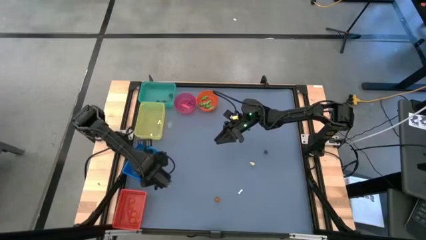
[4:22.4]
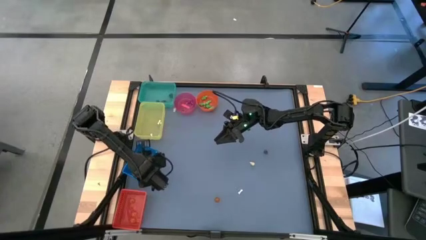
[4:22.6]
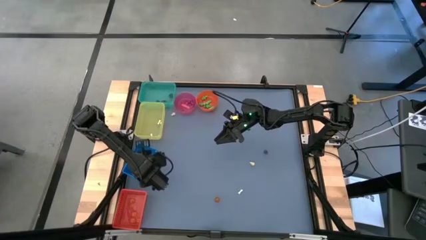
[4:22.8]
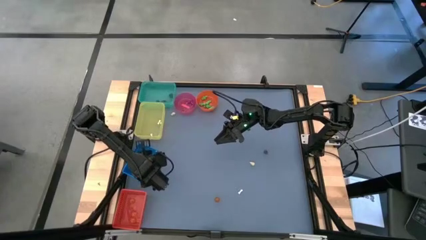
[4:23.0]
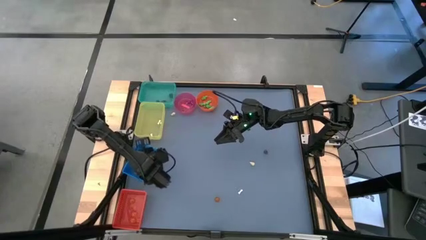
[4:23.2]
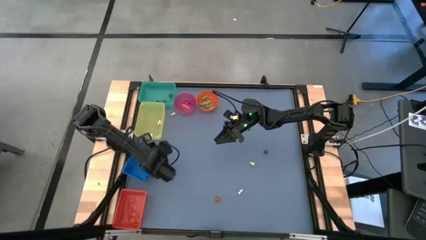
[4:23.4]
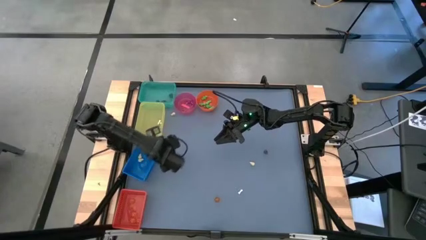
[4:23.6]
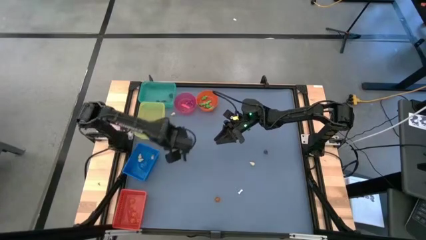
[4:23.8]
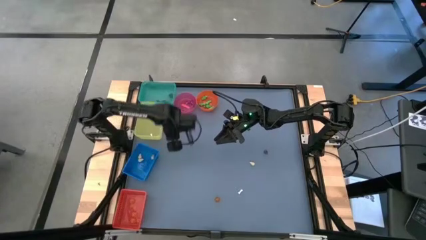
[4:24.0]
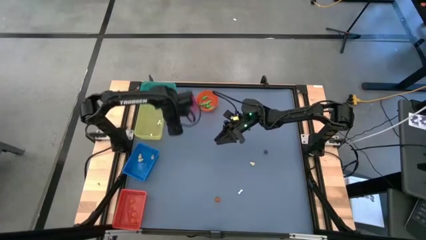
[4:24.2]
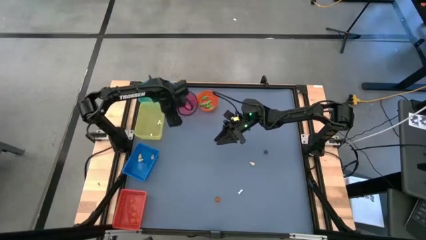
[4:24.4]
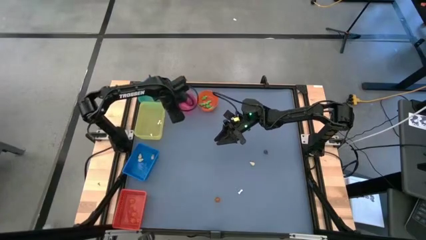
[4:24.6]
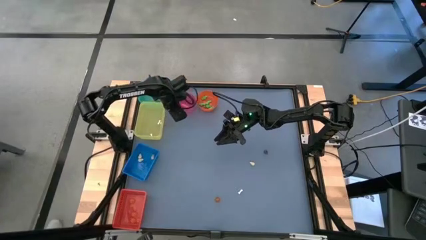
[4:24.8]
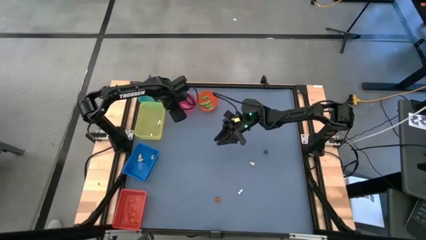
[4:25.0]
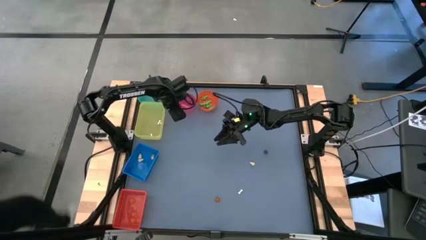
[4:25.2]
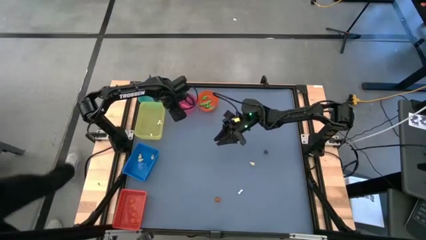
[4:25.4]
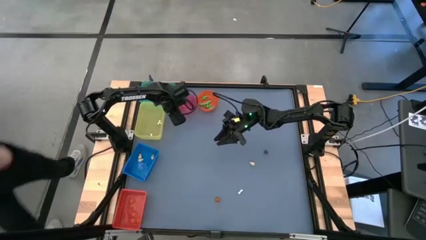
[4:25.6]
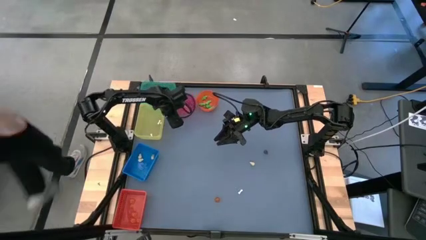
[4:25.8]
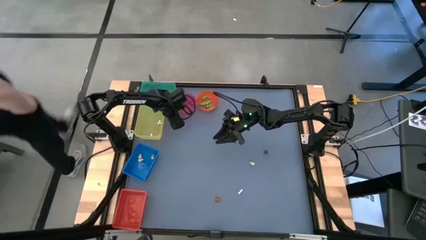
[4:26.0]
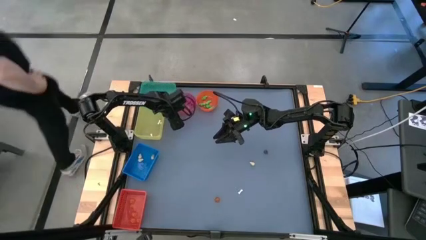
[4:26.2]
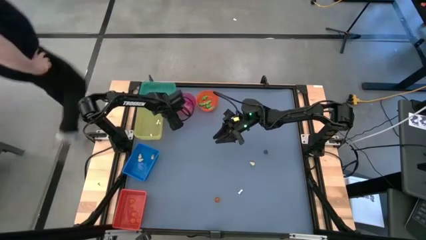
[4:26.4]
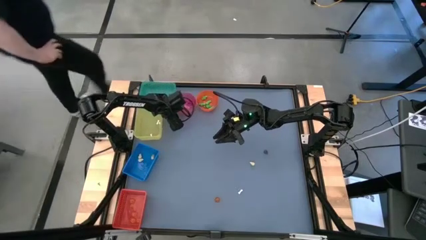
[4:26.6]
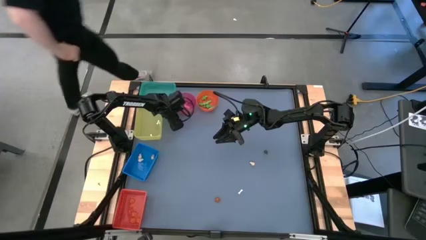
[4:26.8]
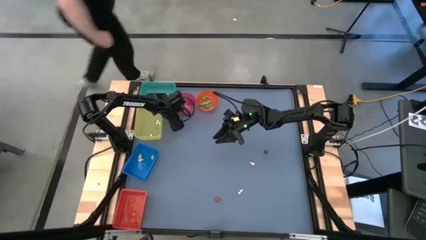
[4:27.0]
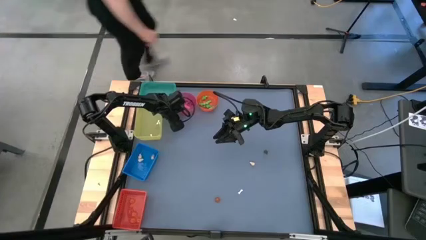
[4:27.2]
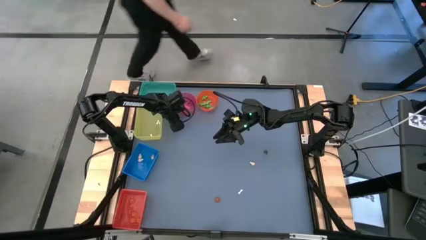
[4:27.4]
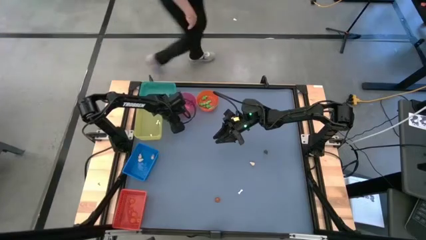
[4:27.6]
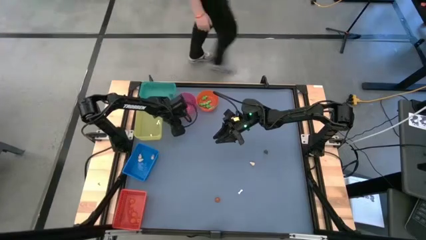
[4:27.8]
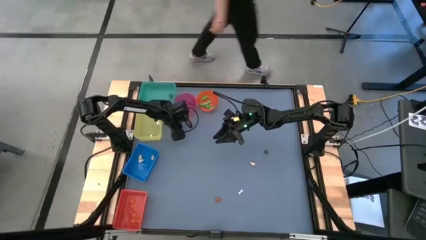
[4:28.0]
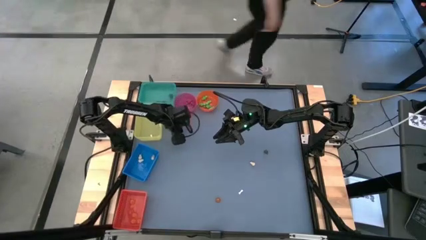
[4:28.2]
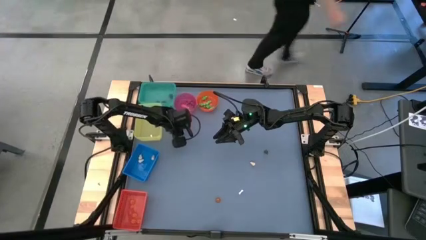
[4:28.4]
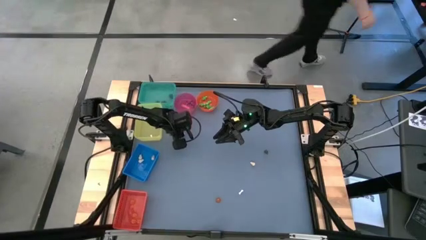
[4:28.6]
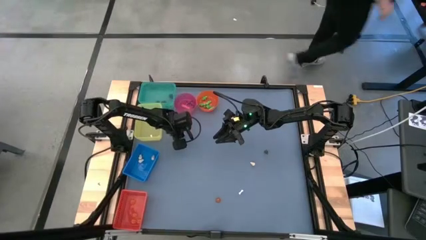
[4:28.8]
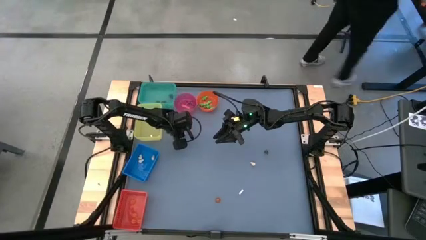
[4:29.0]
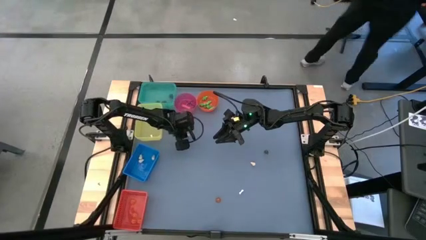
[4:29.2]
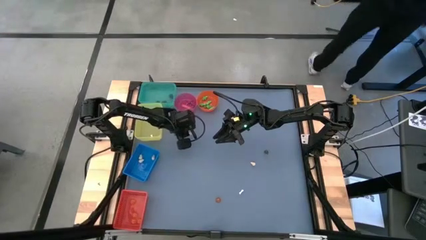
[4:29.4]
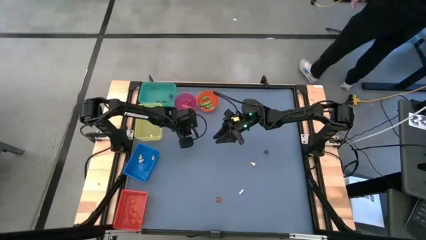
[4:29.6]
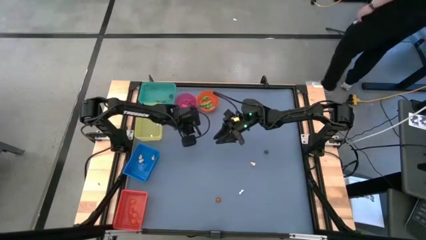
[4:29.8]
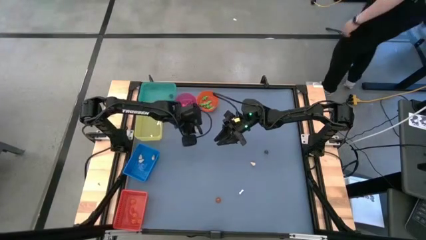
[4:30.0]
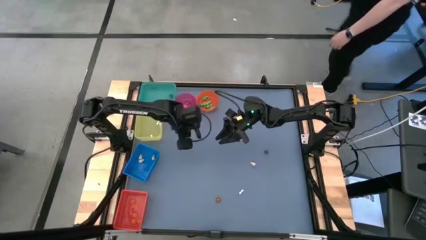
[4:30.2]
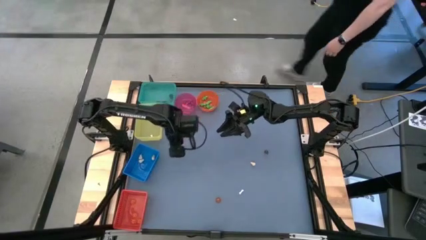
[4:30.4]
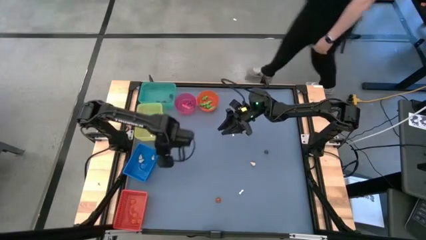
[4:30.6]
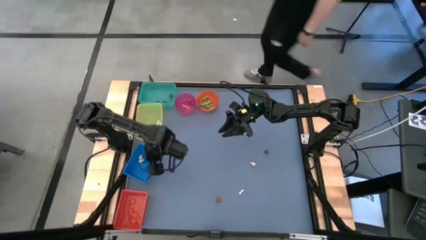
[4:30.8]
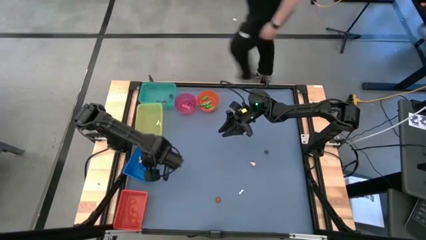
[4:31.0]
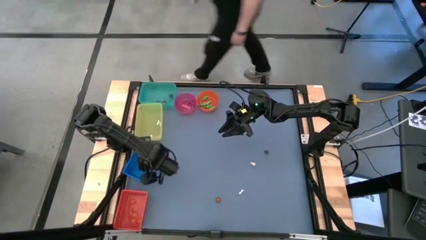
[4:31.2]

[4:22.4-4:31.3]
Task: Sort Halloween decoration
Put the yellow skull toy into the blue bin

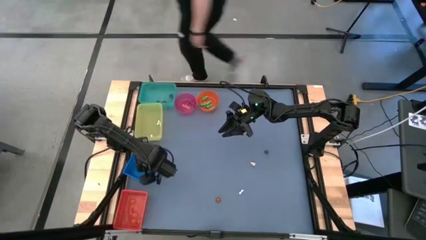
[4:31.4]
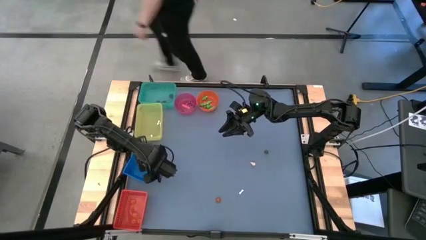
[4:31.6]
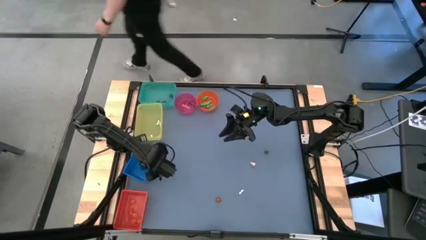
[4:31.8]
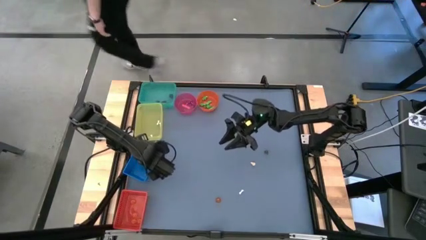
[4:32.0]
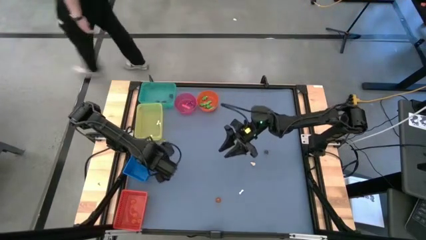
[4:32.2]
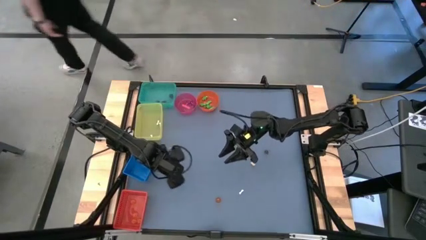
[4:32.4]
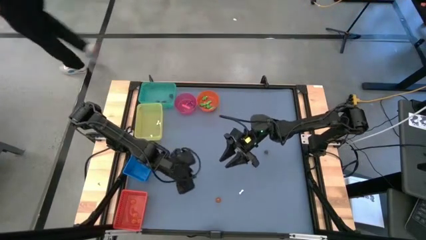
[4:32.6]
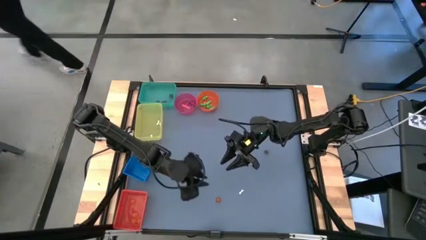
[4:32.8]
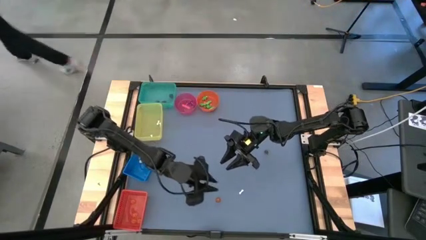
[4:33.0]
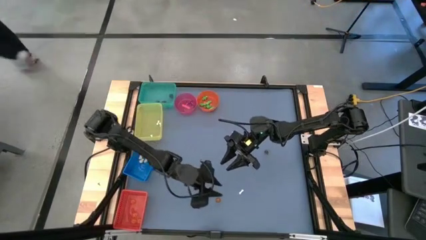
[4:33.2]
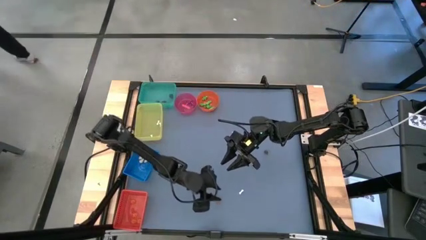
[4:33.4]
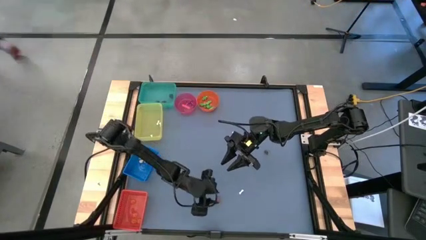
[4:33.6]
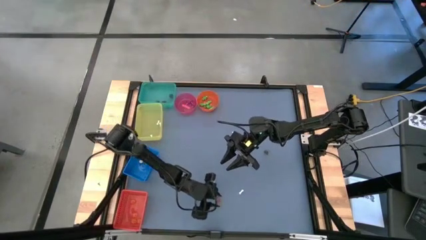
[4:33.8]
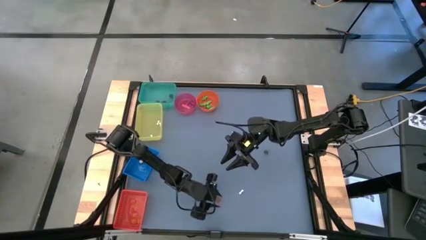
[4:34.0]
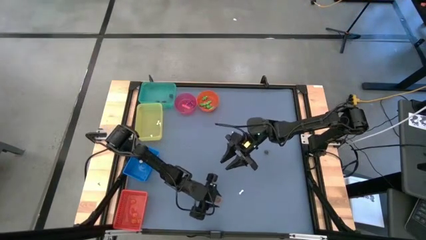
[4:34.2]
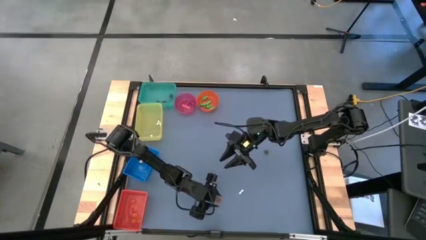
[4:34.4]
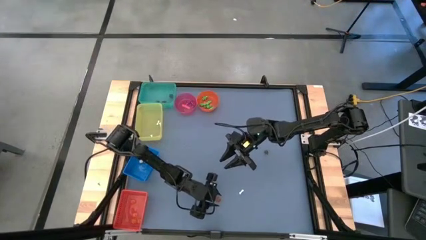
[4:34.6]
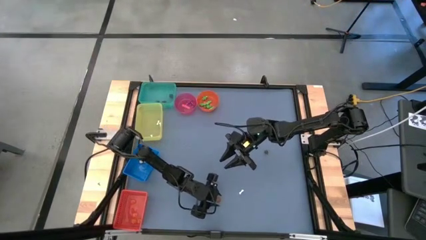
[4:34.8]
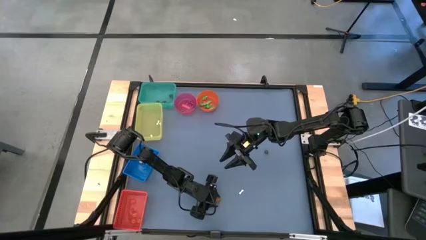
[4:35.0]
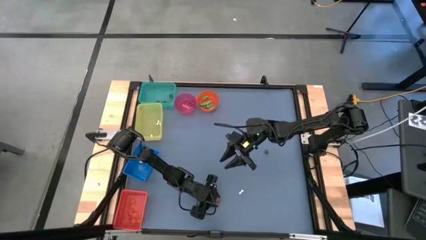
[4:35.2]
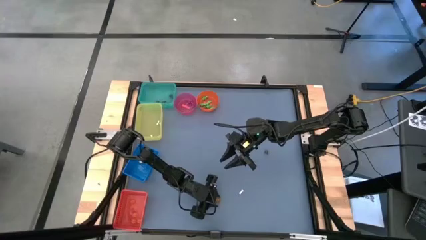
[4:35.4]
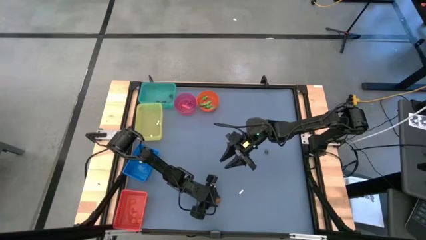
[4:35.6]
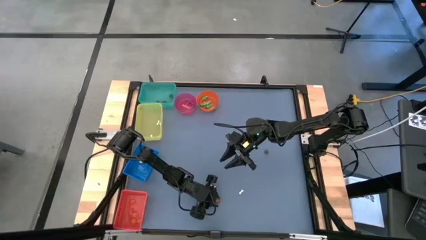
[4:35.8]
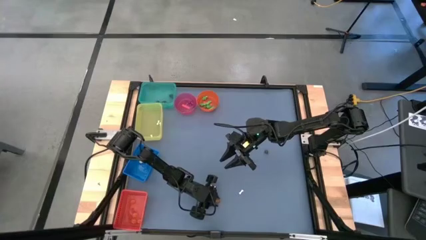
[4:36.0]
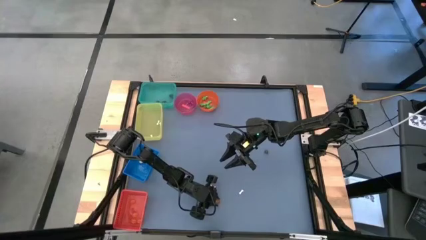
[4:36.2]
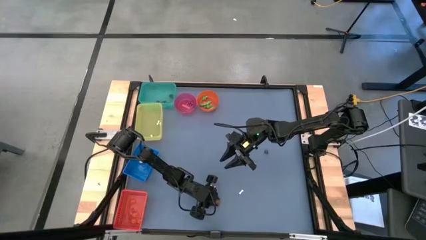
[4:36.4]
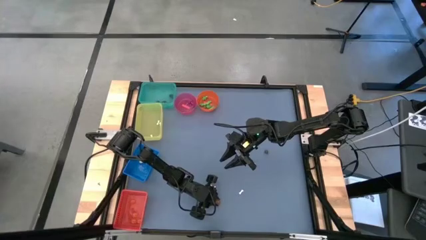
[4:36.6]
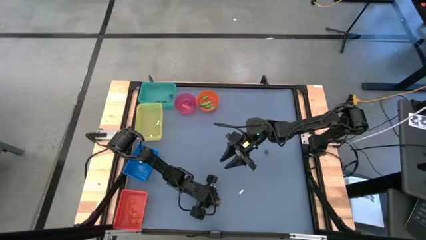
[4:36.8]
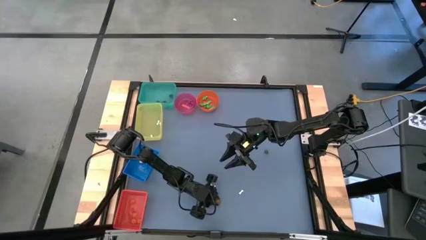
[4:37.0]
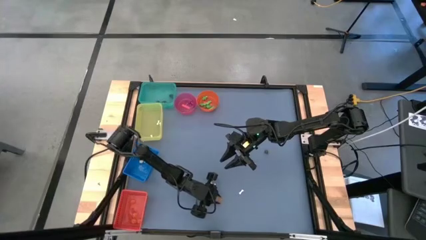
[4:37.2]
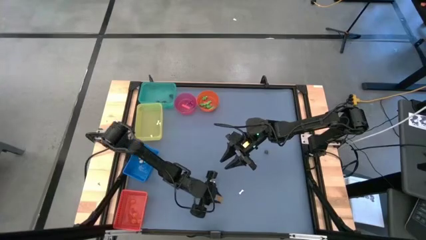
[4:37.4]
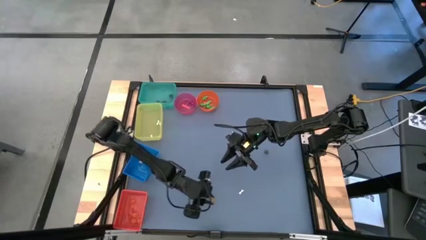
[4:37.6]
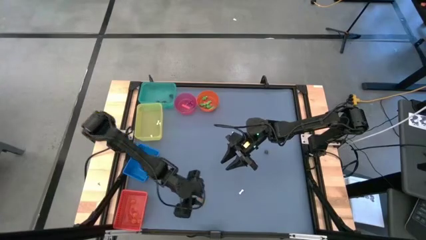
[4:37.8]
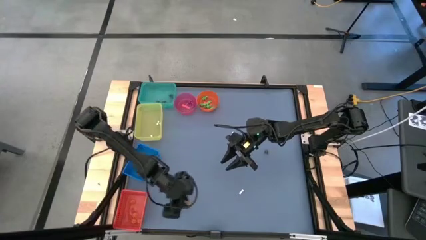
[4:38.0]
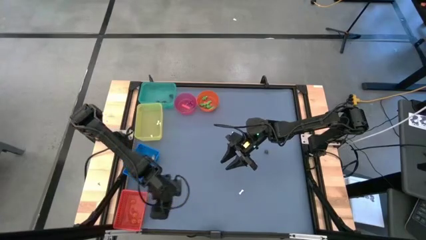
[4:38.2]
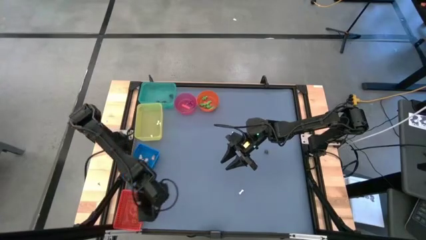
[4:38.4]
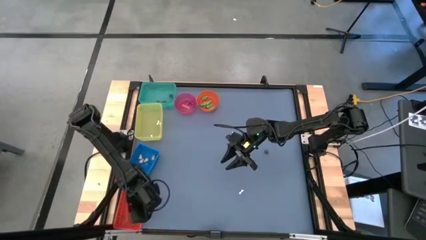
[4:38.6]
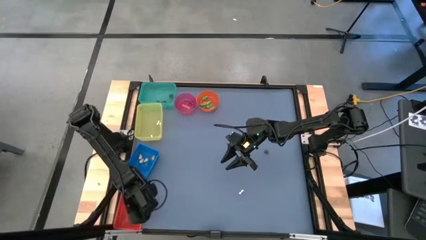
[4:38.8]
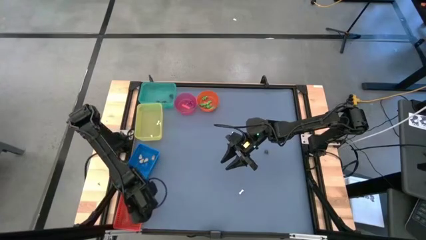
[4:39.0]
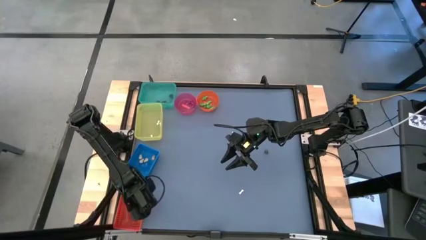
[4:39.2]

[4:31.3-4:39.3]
Put the orange pumpkin toy into the red bin
